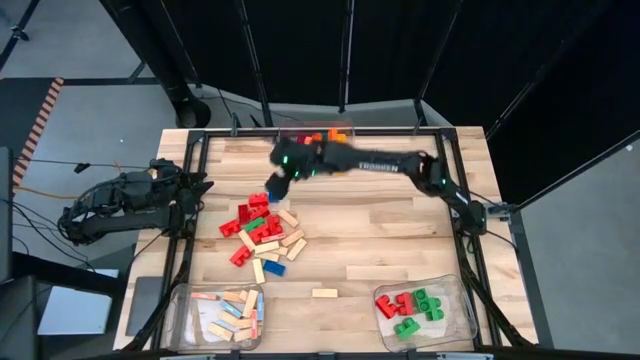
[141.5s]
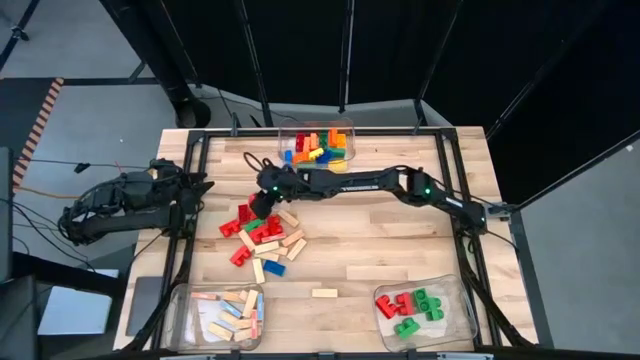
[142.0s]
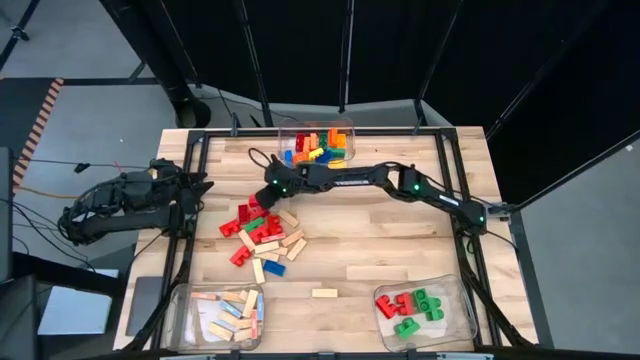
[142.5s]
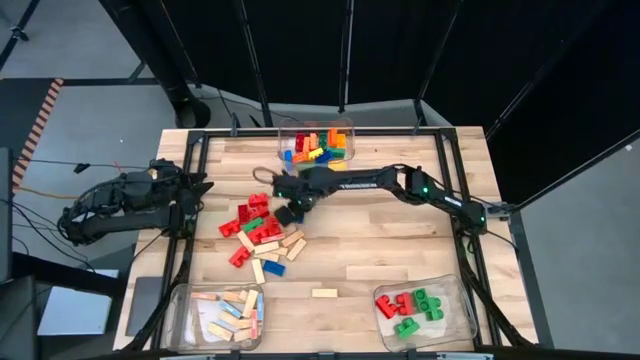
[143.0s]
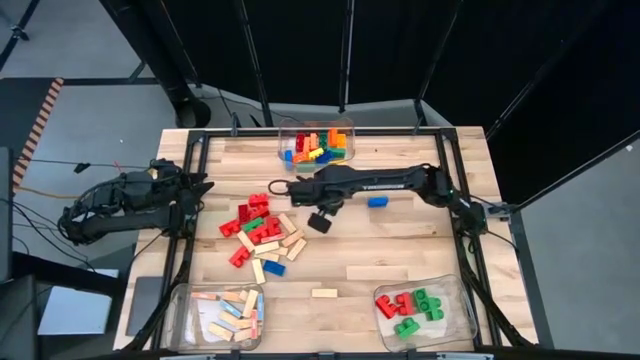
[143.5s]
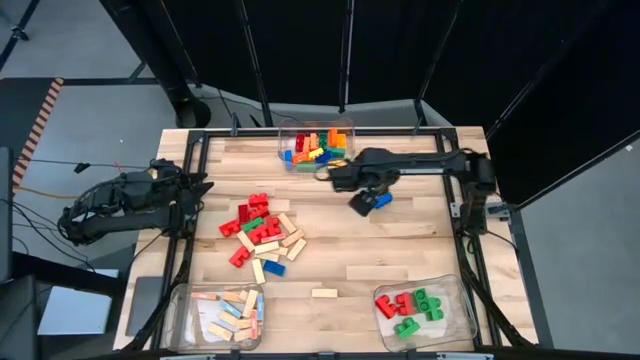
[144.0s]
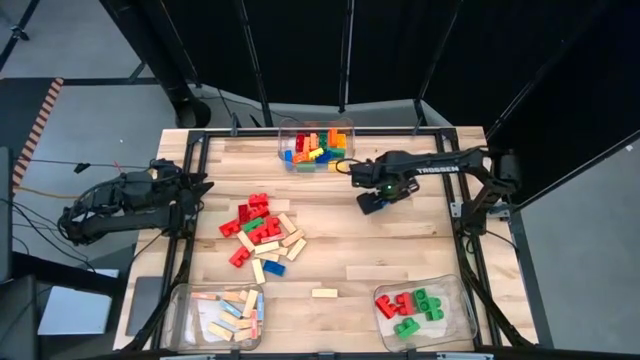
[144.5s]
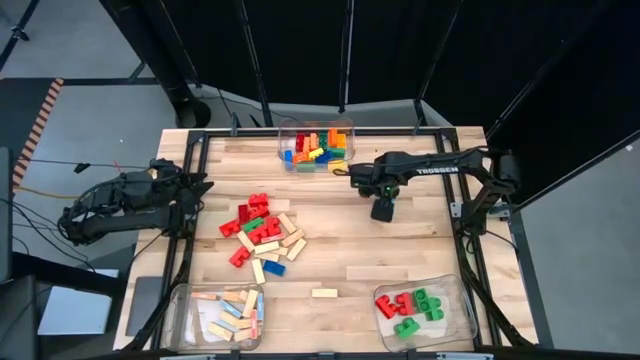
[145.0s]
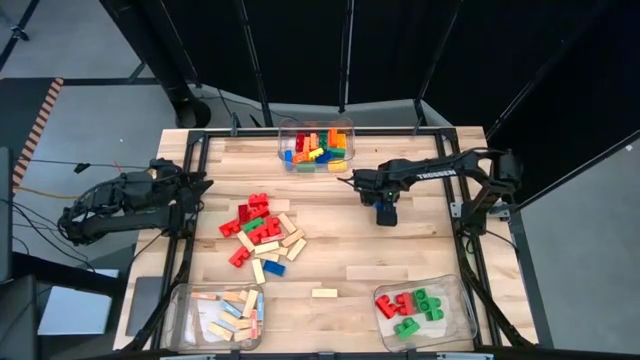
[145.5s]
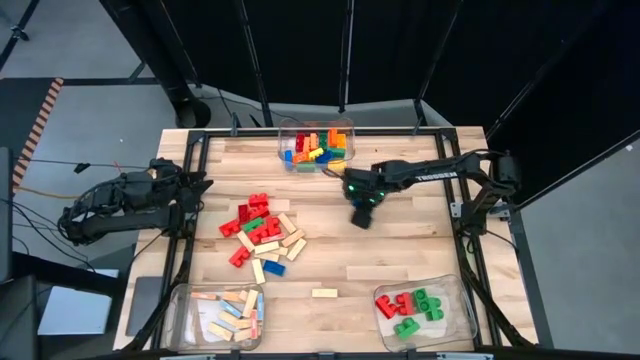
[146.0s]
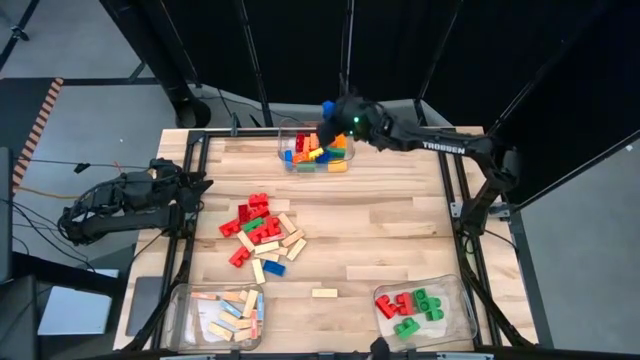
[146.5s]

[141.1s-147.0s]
Task: Sort blocks by size
Put the 4-stud blue game piece into the top center transparent bin

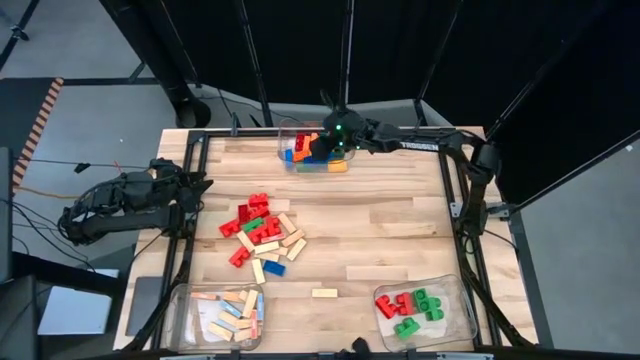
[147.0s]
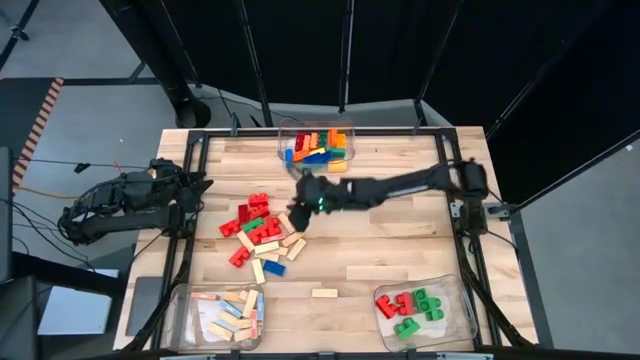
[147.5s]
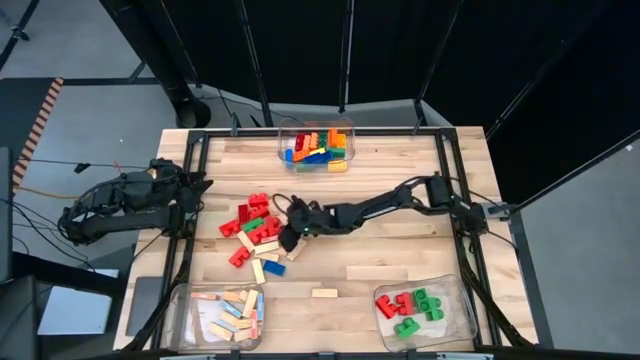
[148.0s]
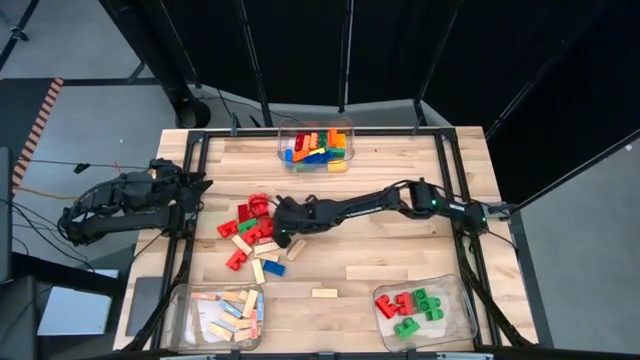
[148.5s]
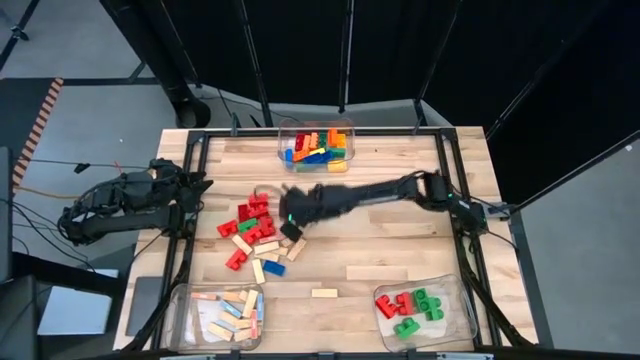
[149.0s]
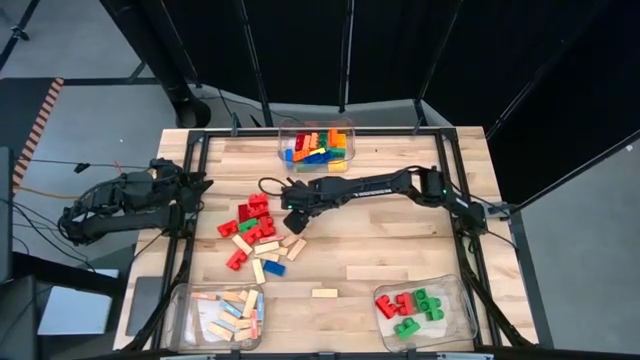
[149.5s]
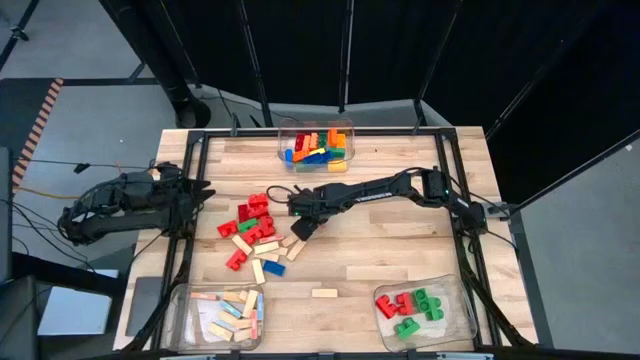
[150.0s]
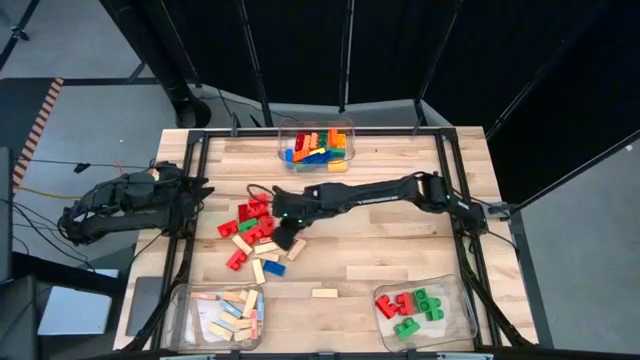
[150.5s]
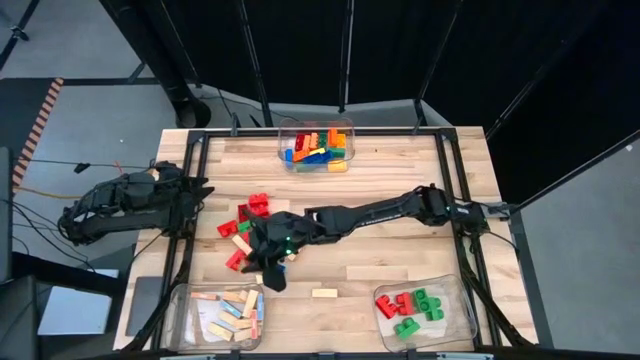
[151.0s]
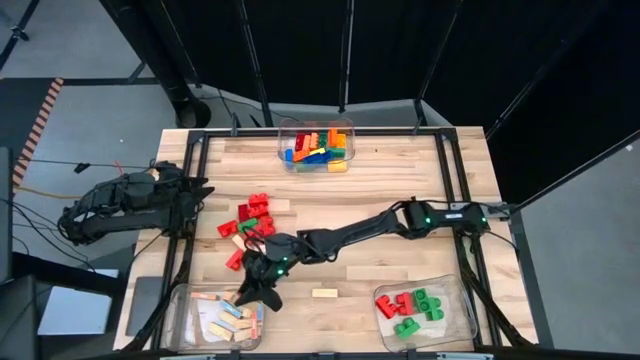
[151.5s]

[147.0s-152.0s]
Put the white block into the bottom left transparent bin

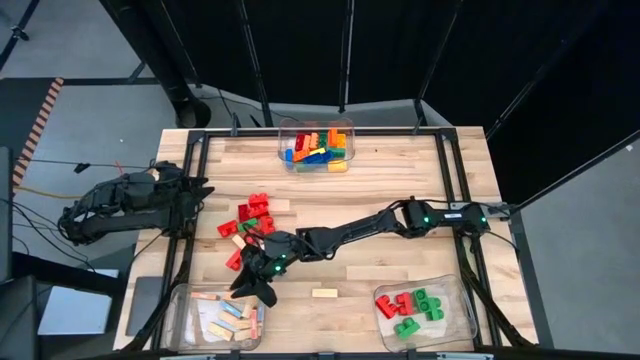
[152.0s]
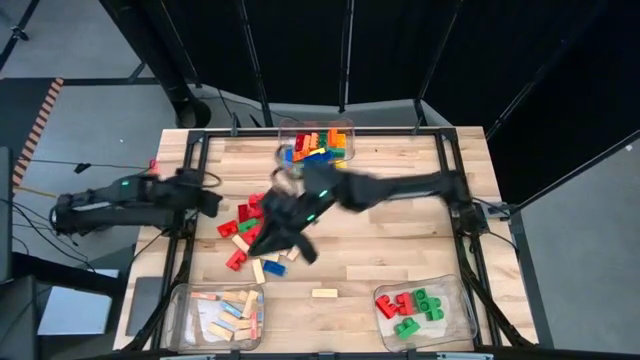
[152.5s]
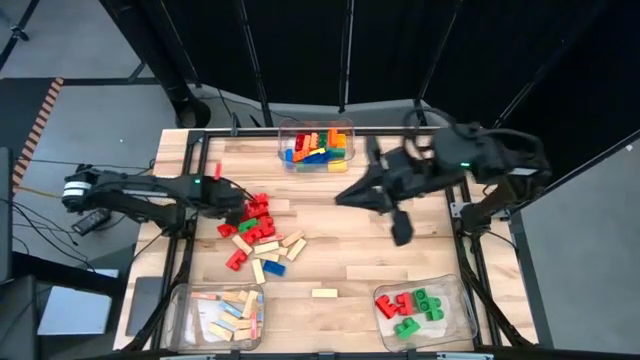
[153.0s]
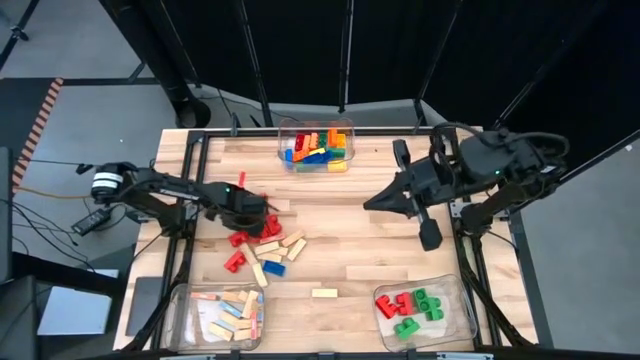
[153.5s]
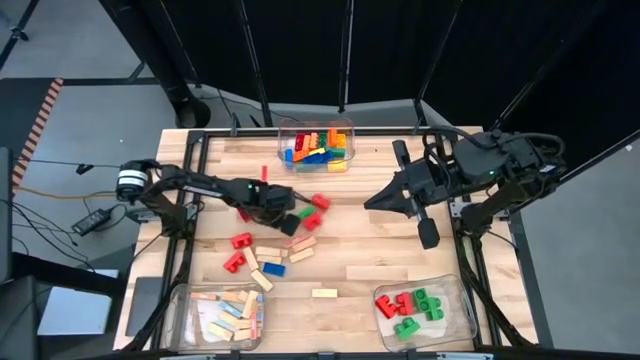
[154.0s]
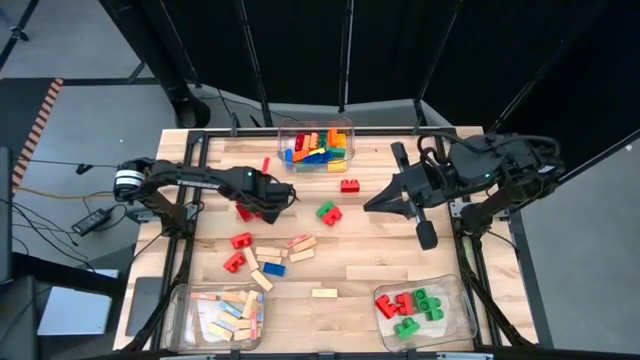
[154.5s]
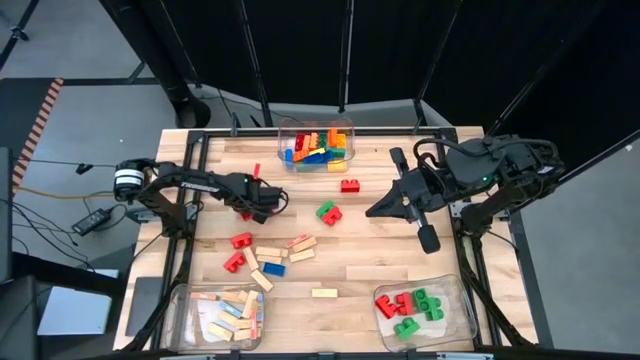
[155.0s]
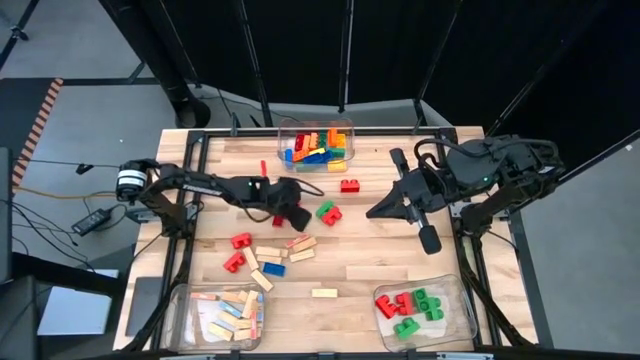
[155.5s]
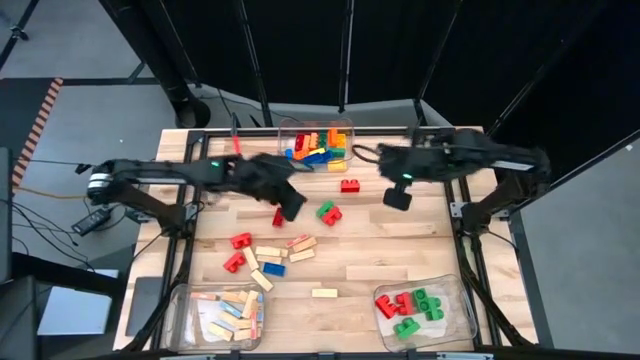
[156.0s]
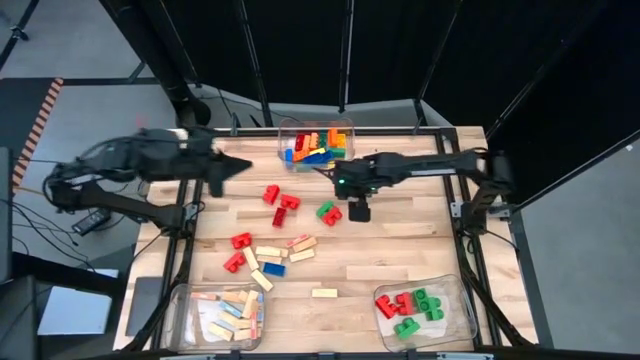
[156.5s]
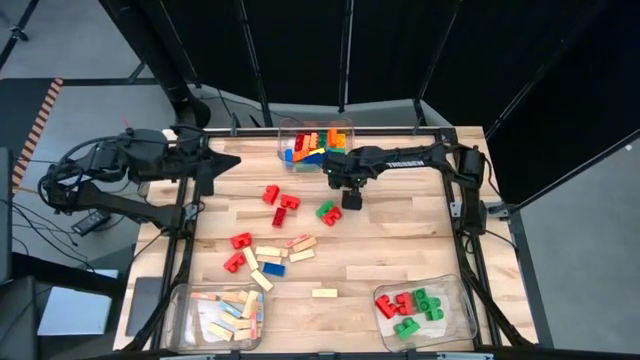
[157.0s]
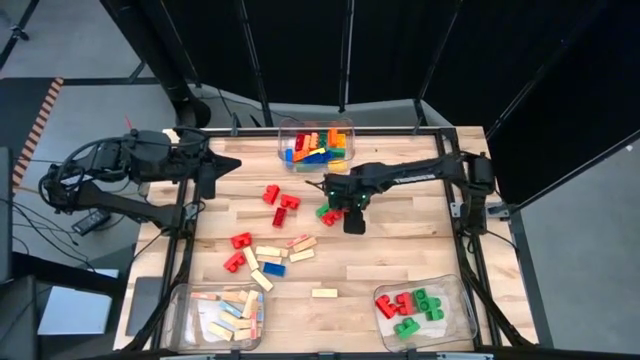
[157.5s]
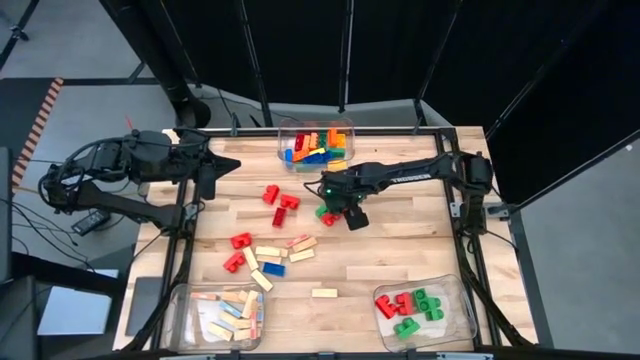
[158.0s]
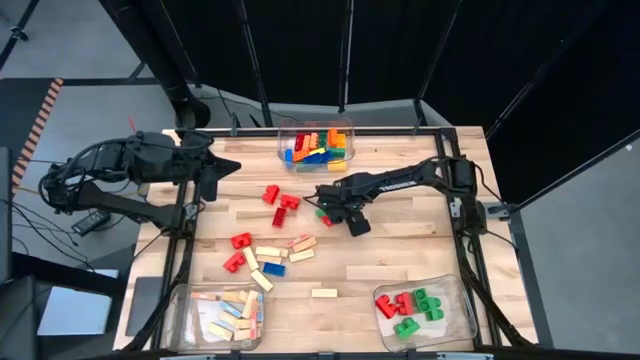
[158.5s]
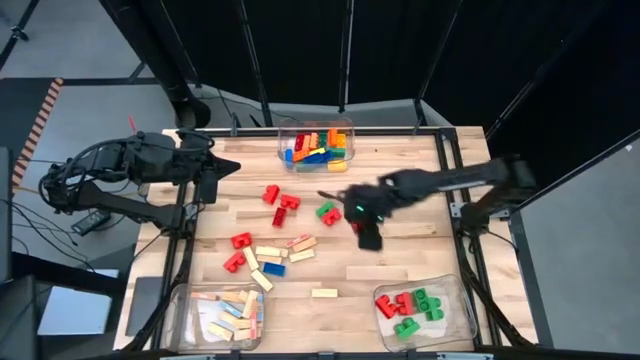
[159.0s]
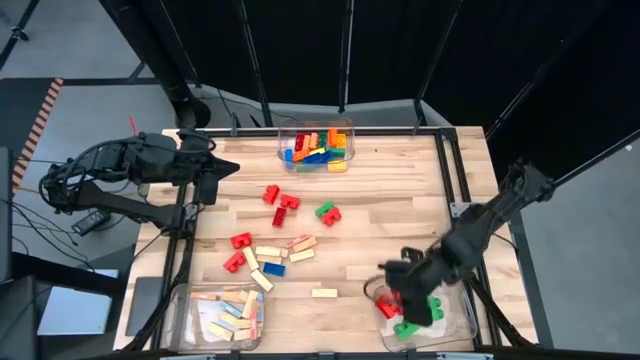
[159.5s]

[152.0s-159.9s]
Put the 2-stud red game piece into the bottom right transparent bin

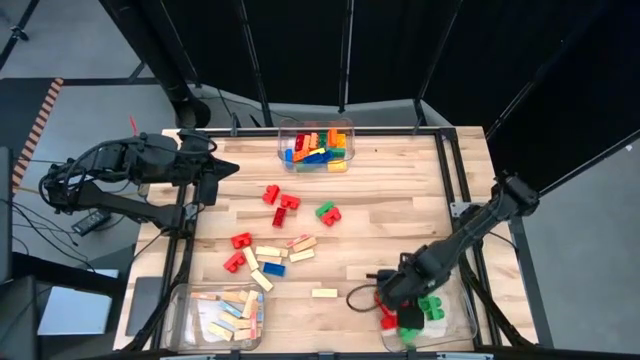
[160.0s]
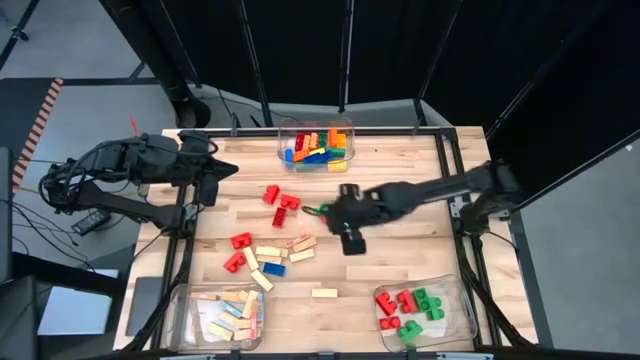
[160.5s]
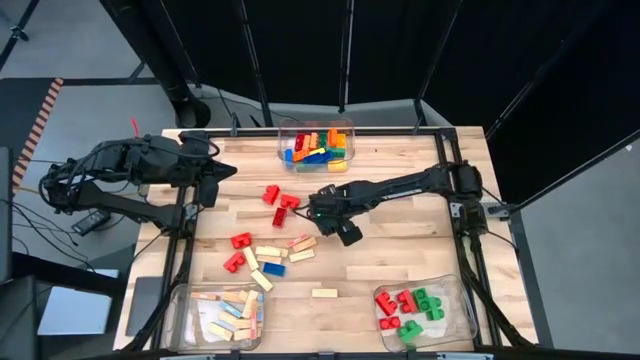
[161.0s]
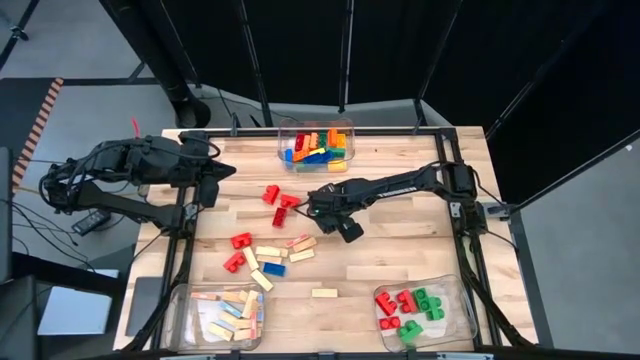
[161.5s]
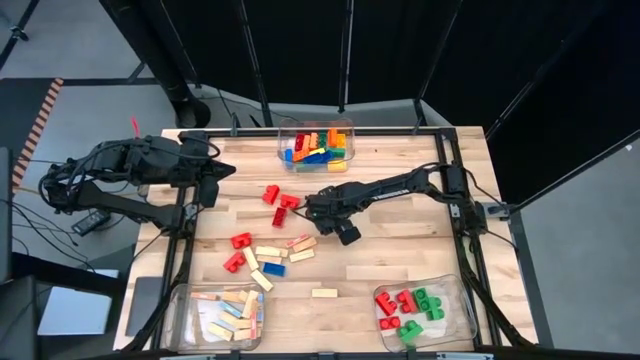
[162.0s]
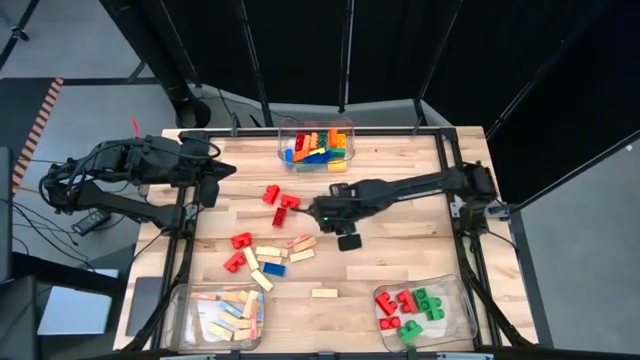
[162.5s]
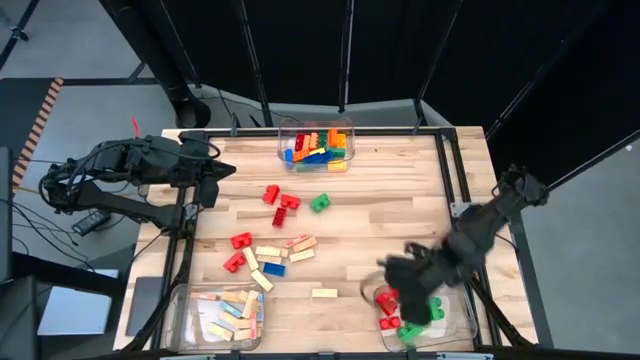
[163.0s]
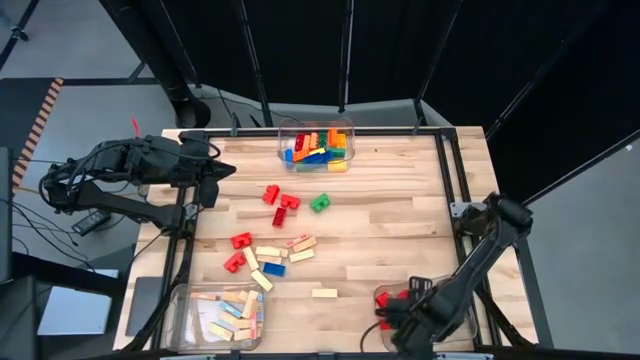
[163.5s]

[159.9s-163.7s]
Put the 2-stud red game piece into the bottom right transparent bin
